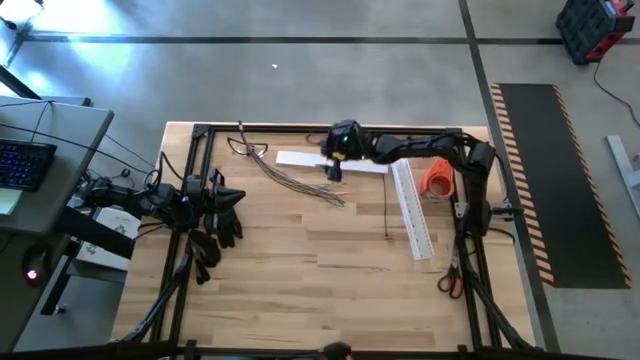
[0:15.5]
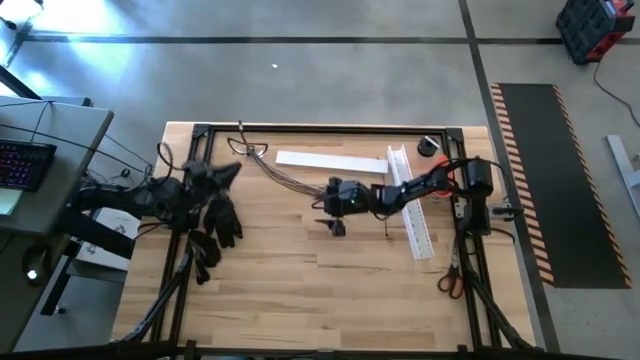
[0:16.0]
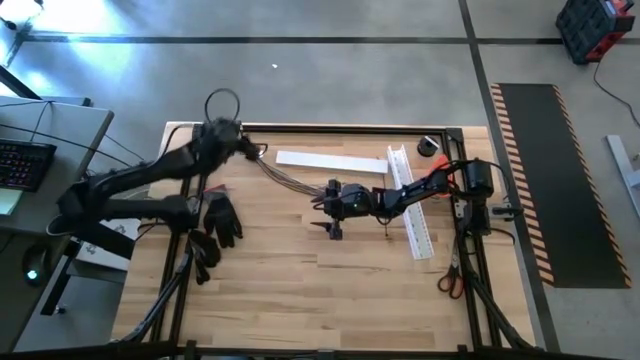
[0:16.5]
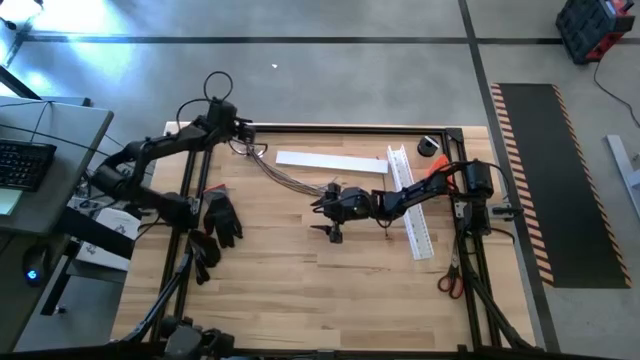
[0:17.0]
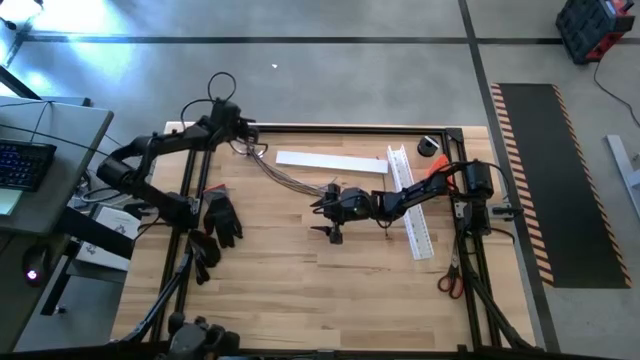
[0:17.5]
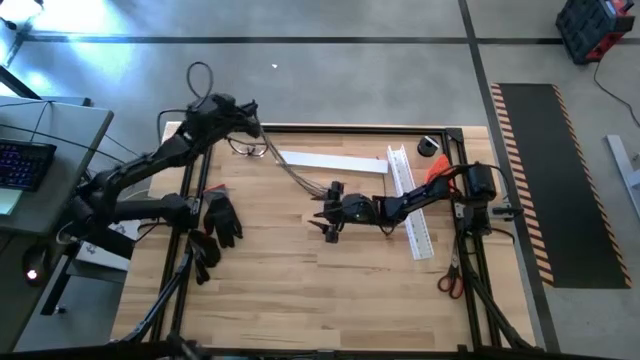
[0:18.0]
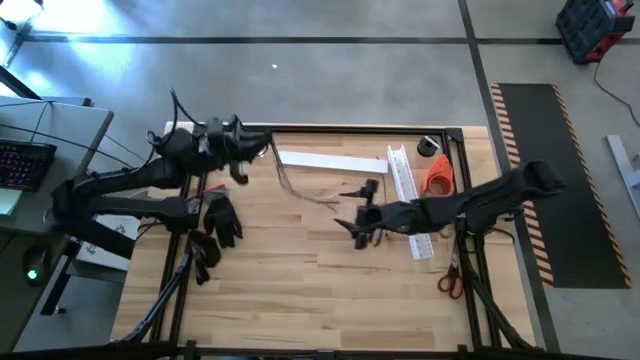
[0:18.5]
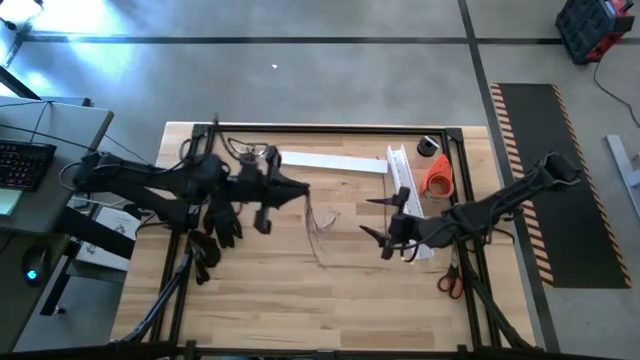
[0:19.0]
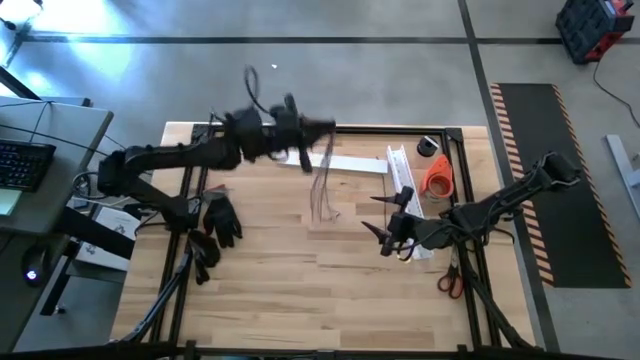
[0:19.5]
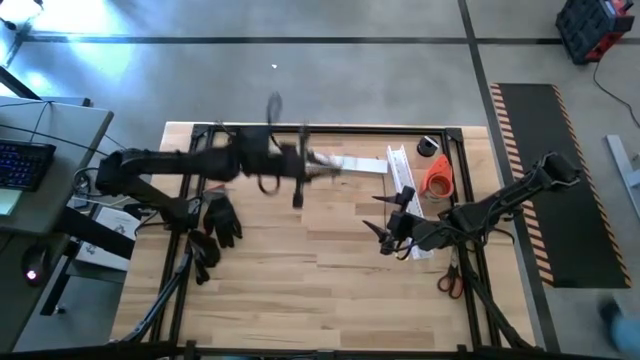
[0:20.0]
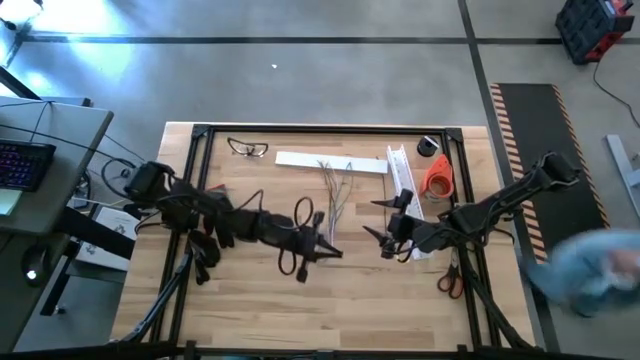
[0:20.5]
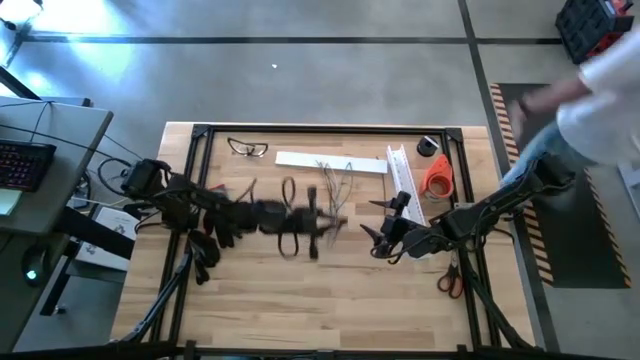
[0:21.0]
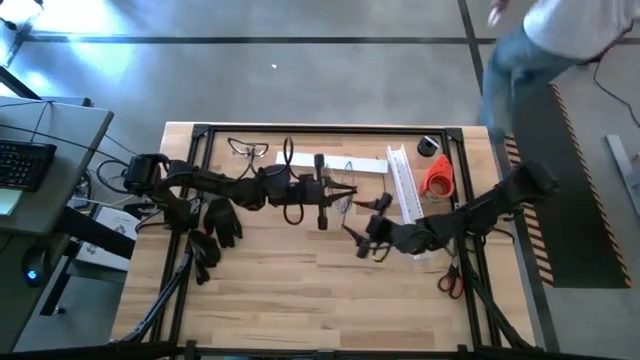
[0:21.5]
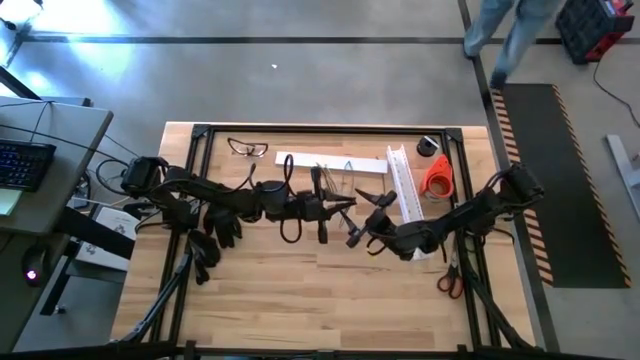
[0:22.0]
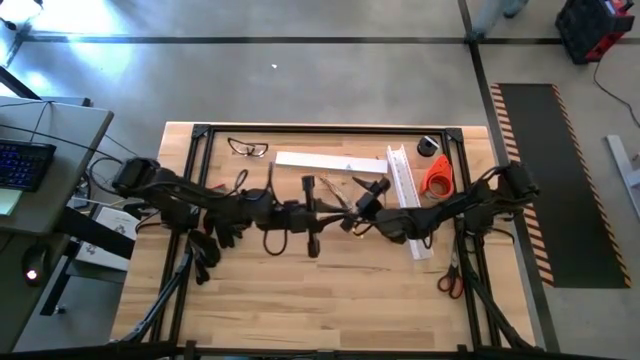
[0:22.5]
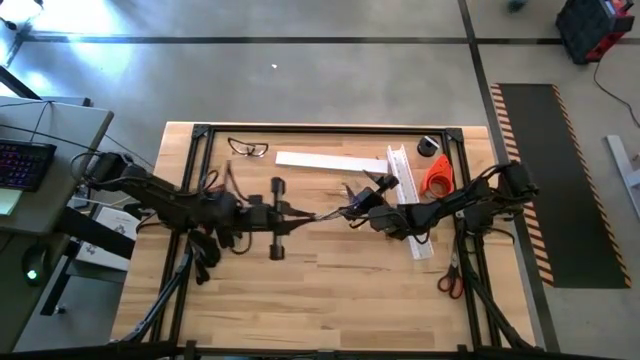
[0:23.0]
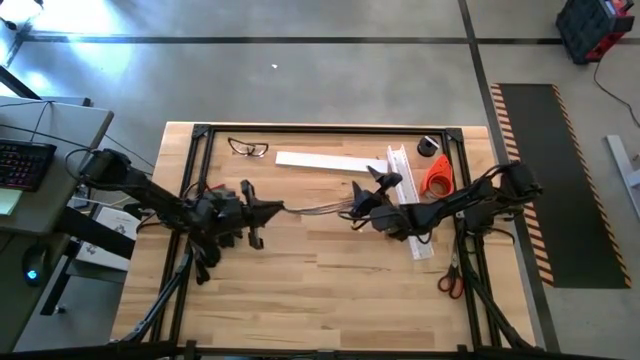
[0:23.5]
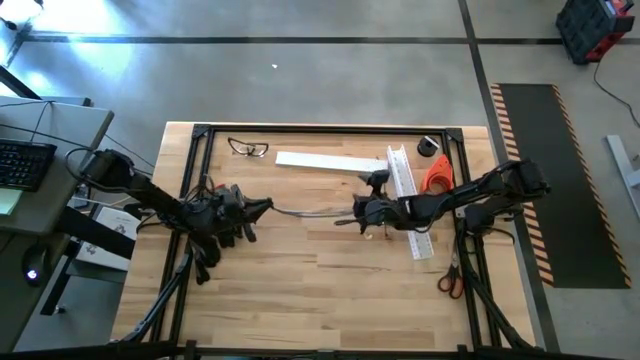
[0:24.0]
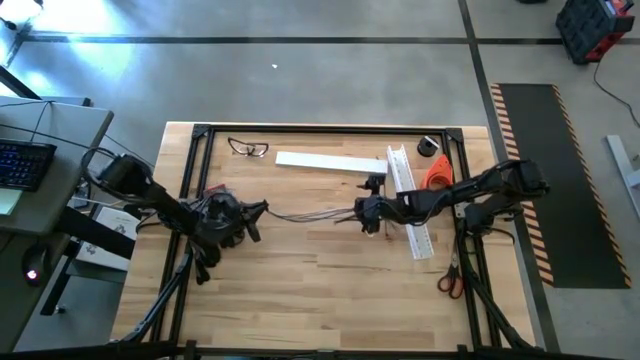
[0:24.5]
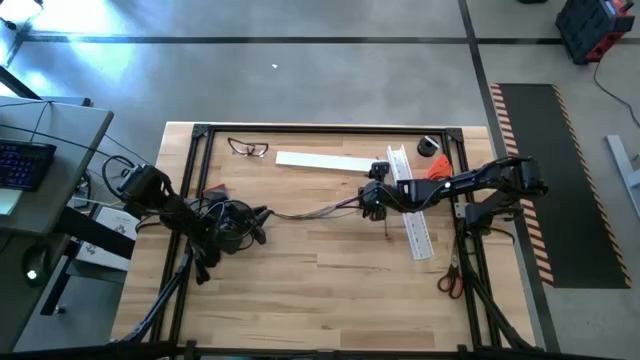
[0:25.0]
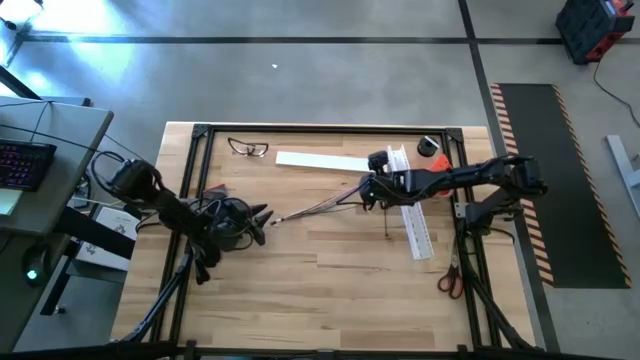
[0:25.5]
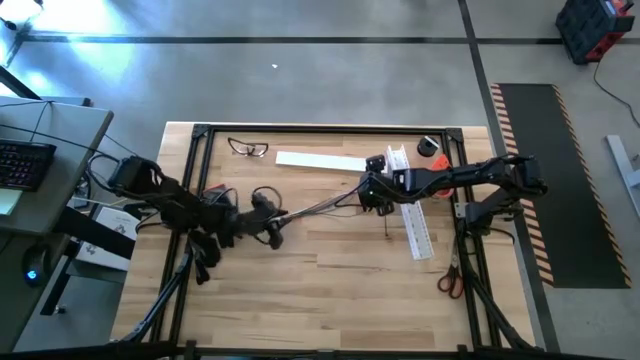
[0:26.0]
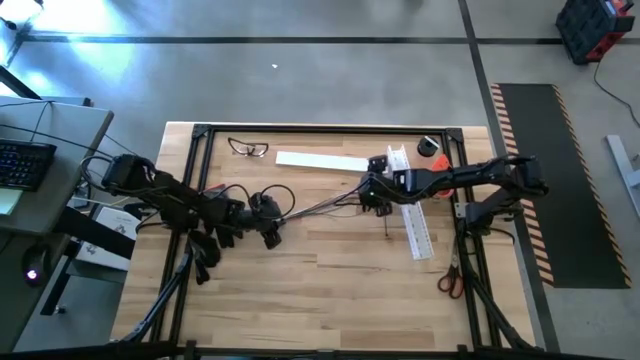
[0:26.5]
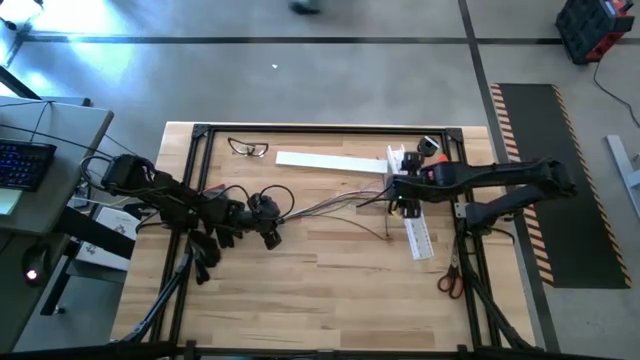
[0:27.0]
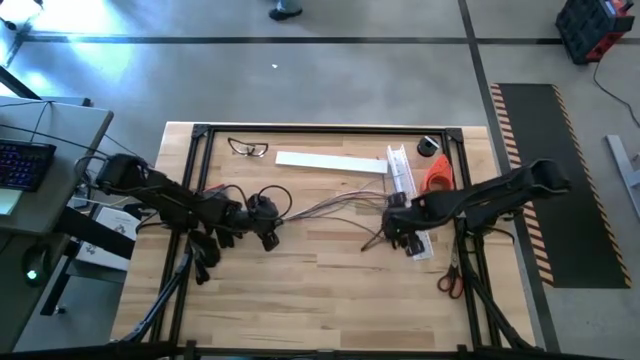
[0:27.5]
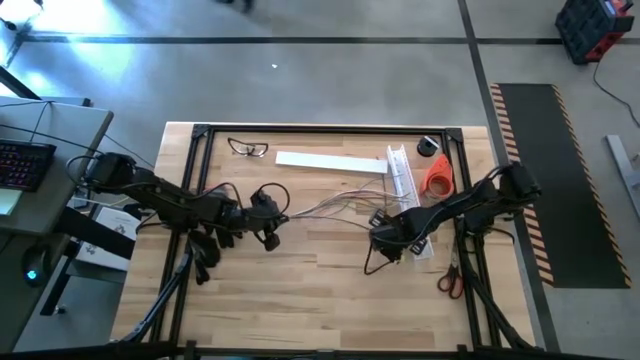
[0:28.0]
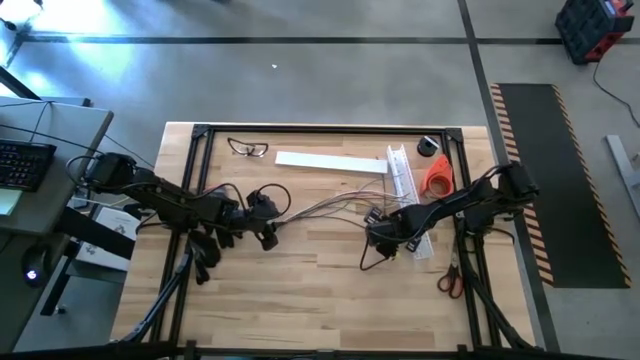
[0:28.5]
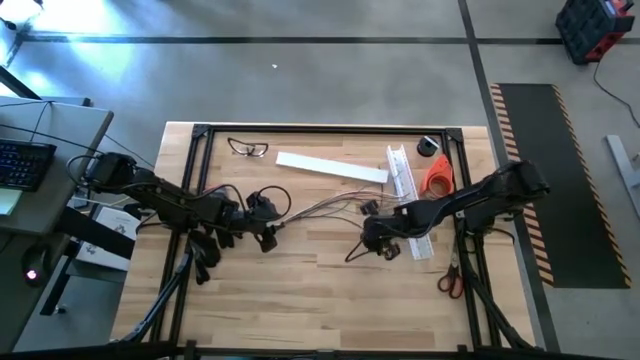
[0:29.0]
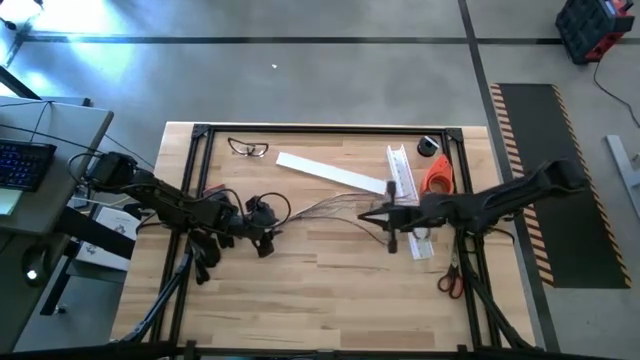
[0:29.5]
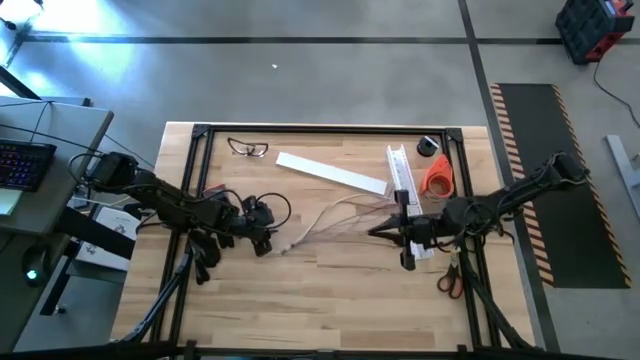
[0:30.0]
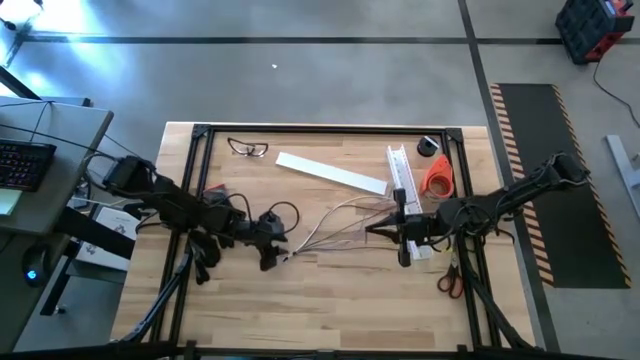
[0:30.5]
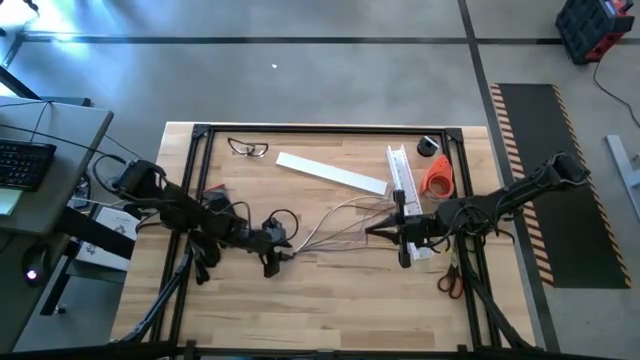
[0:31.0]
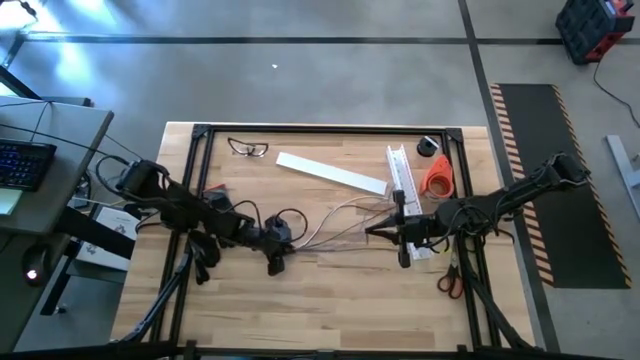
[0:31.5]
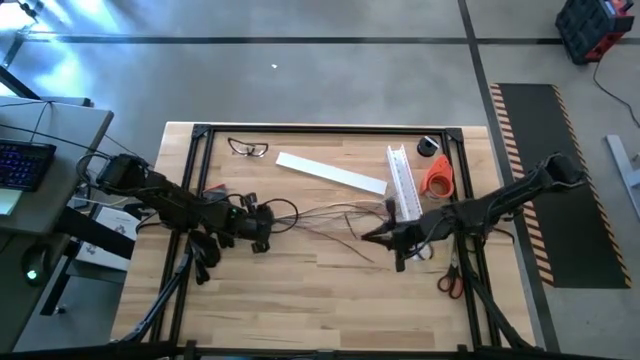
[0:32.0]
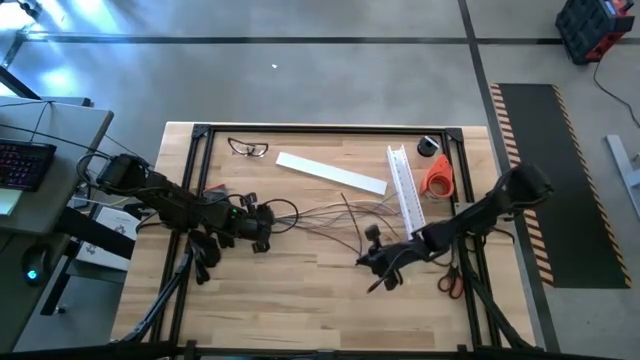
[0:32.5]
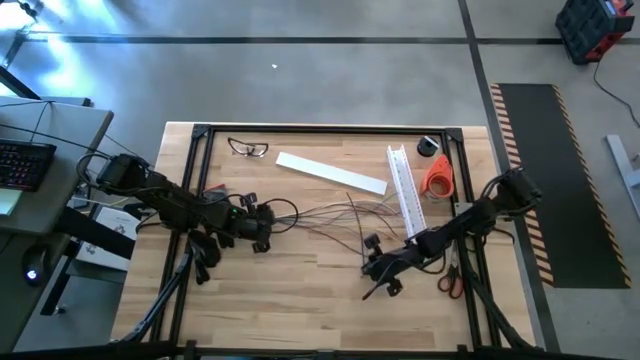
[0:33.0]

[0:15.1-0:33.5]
Task: Ziptie cables
Wrap the cables using a zip tie

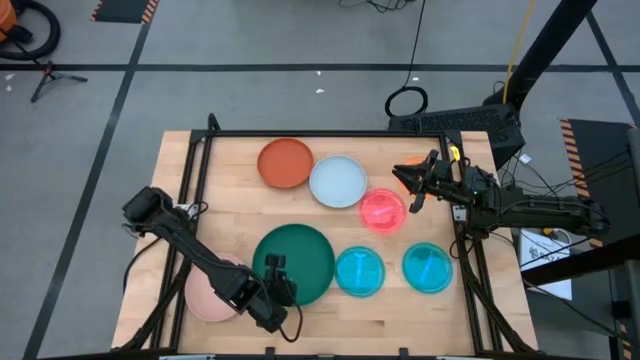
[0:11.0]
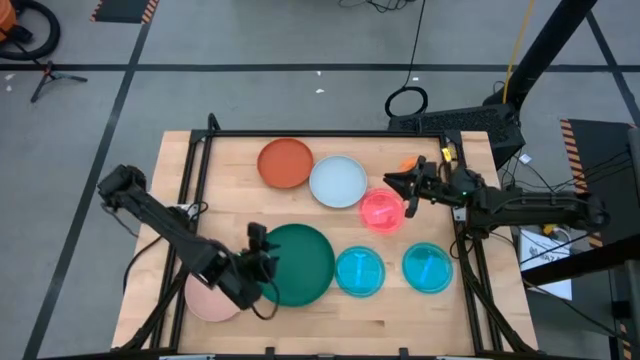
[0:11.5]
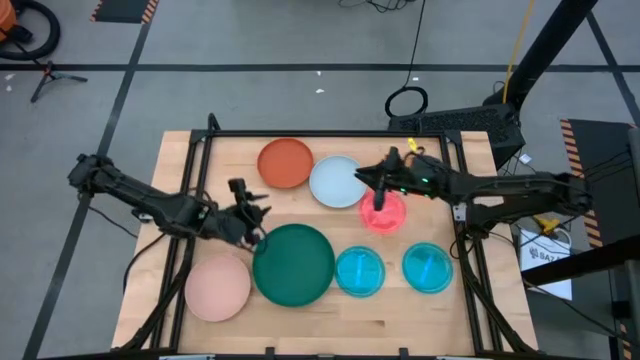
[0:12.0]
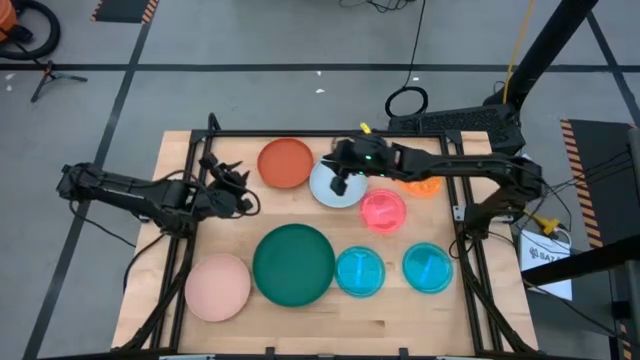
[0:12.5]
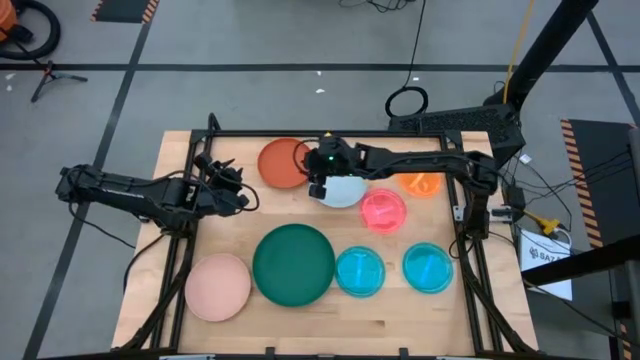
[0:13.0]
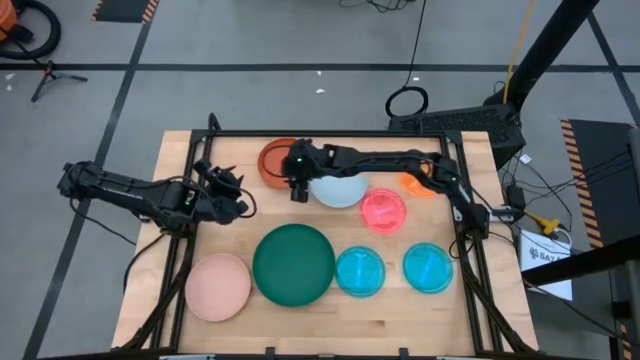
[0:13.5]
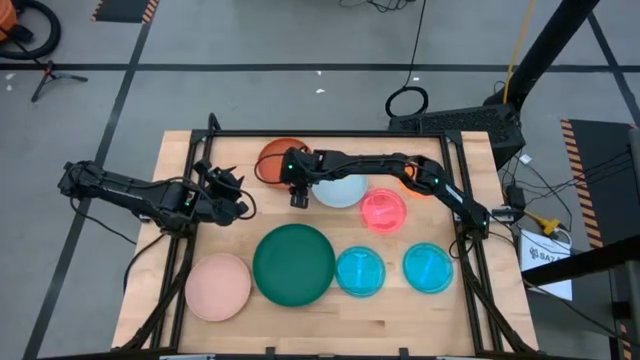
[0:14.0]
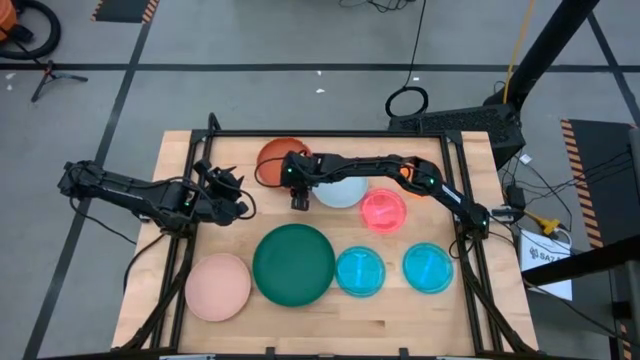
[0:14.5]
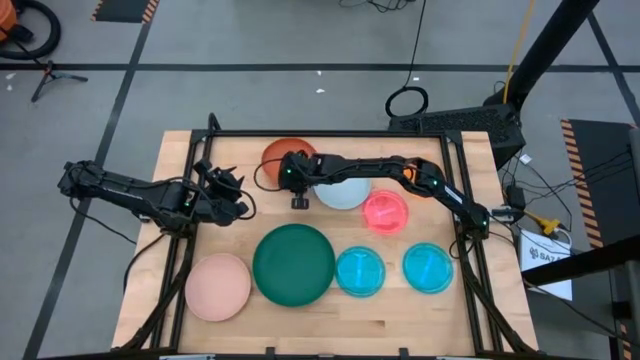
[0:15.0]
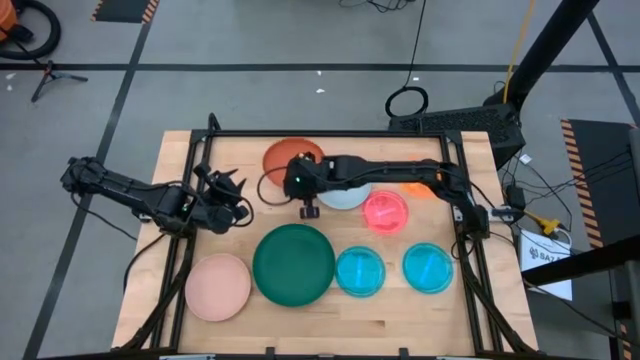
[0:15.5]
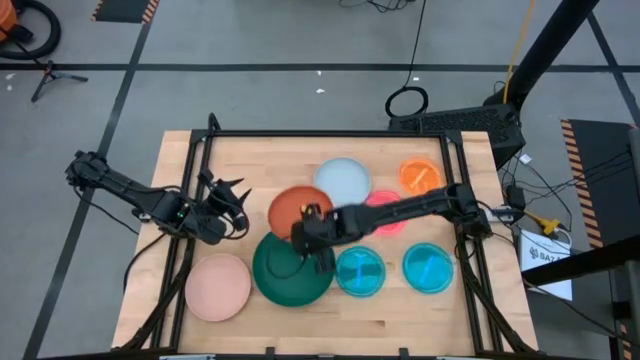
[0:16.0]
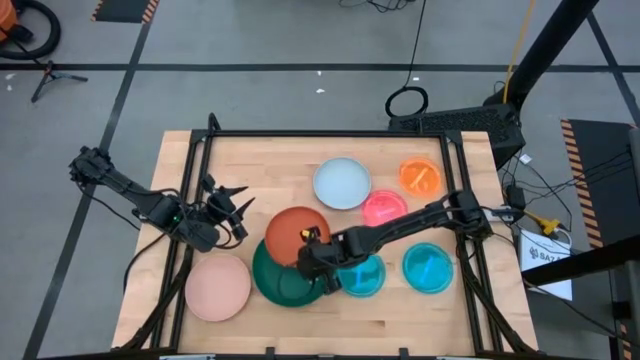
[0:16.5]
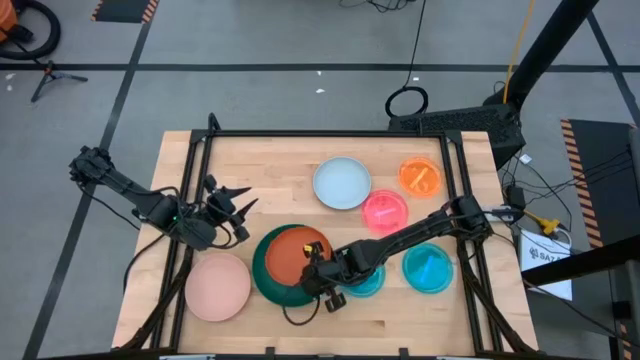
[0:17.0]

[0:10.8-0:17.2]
Task: Stack plastic plates
Stack the orange plate on top of the dark green plate
